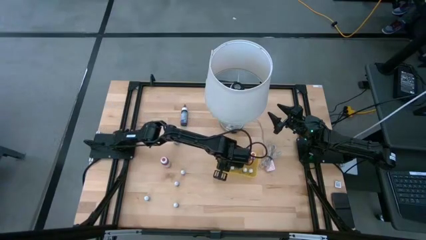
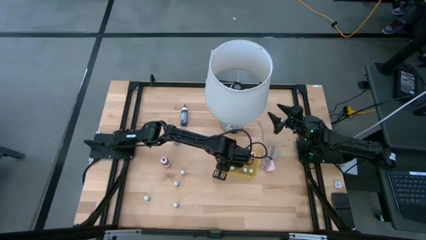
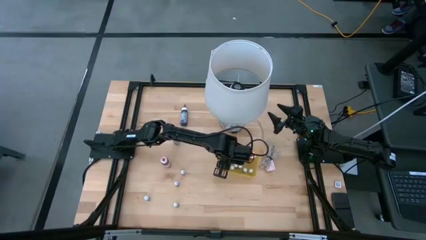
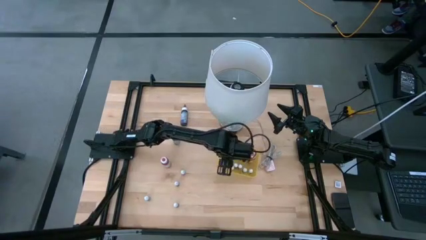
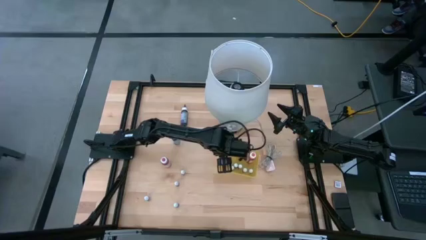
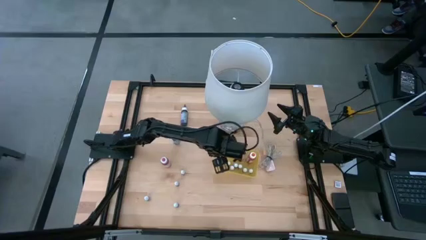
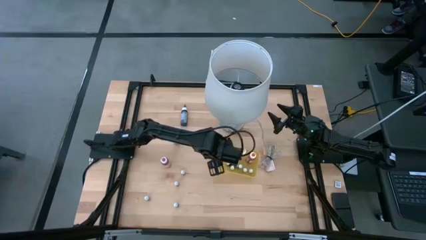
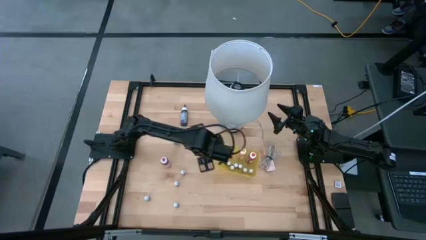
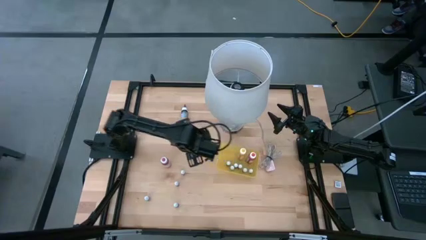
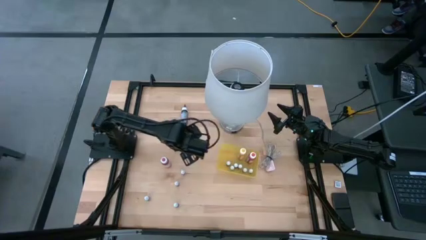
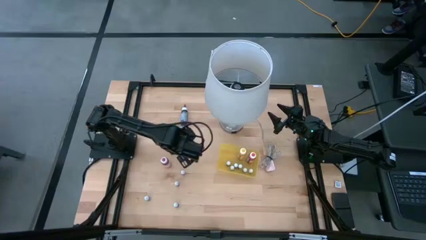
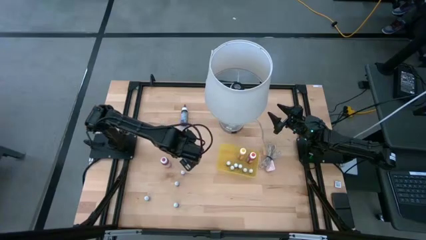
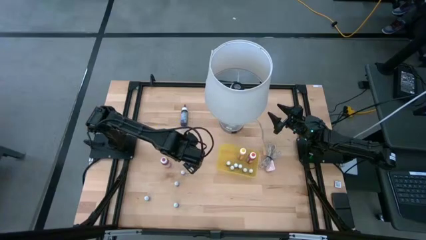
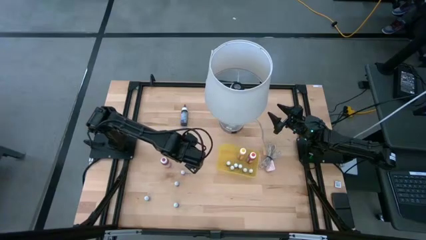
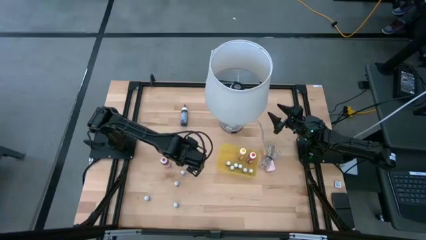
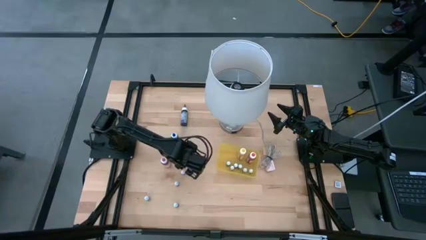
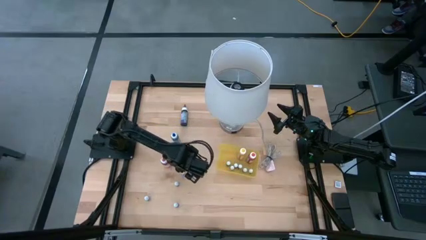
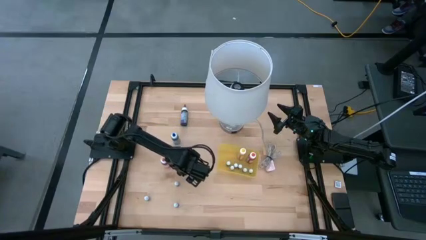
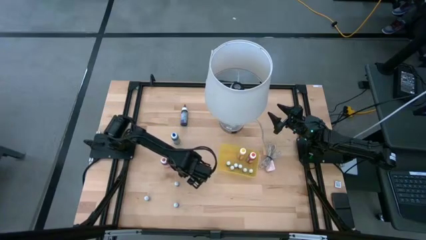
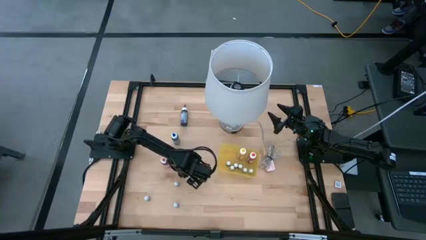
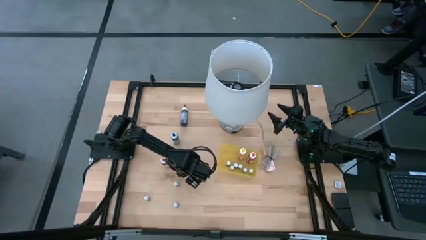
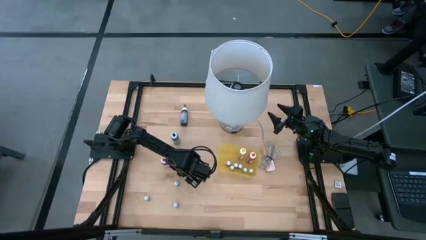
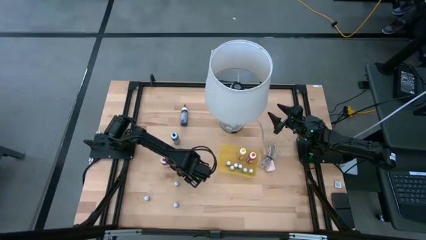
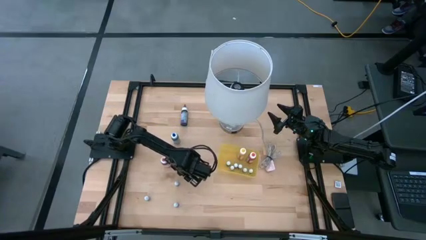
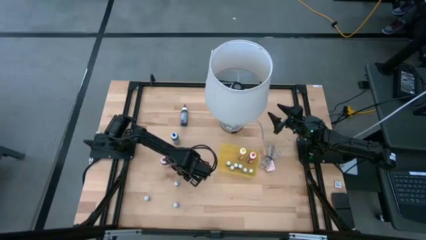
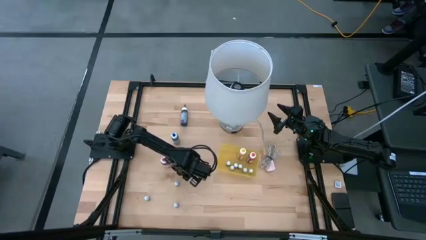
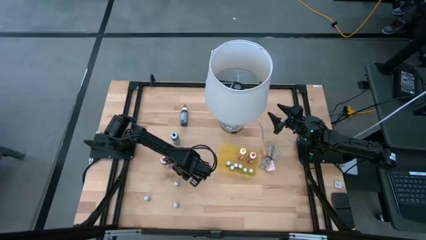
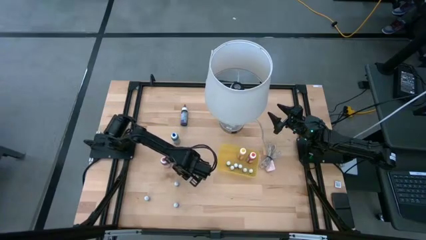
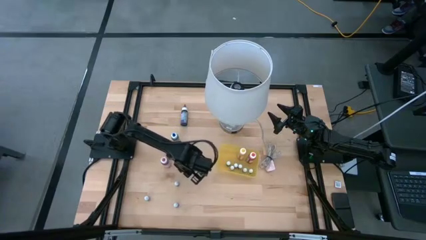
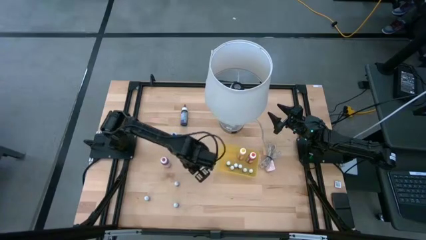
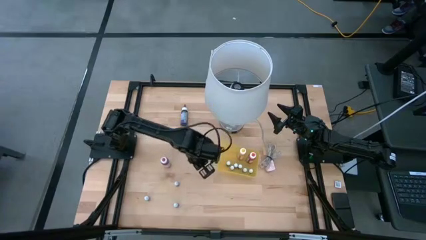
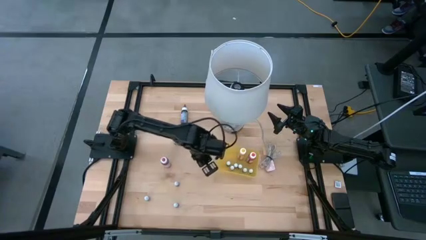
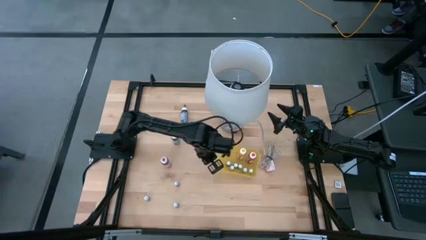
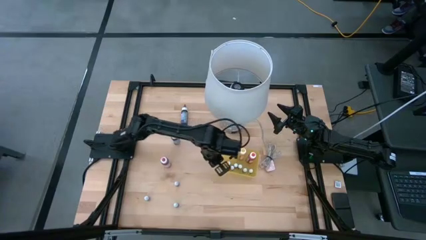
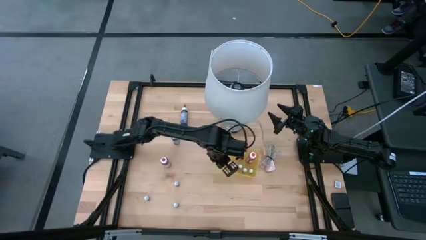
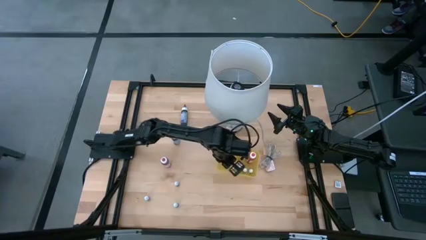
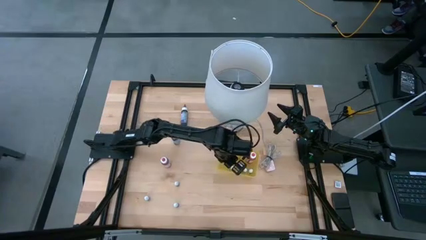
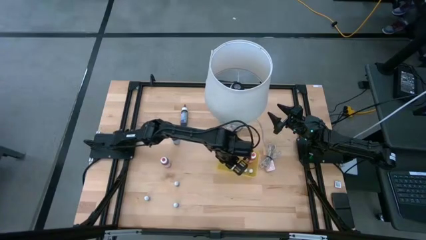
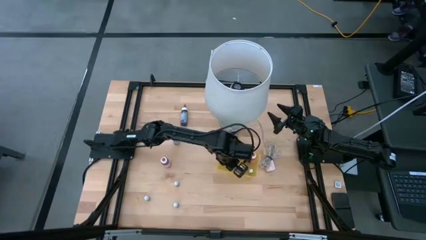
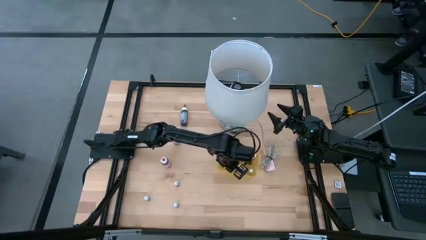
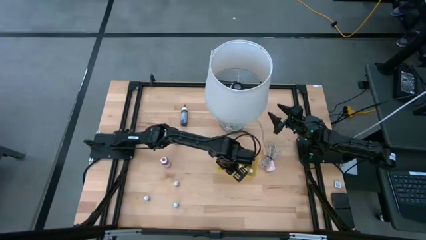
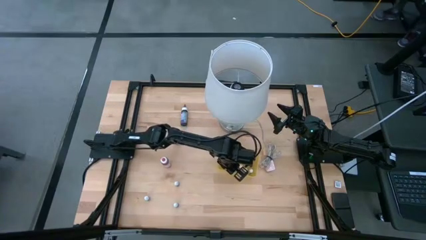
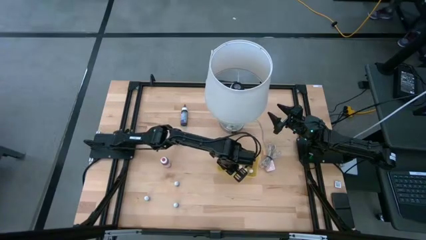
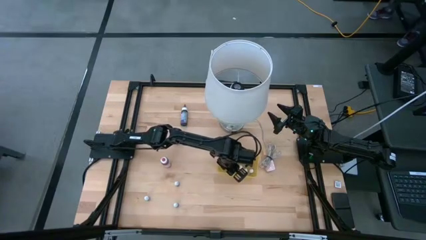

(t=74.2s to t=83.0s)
Task: Pick & Place food coloring
Put the pink food coloring bottle into the yellow bin

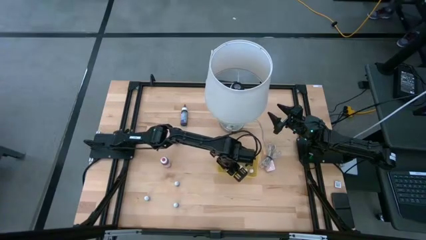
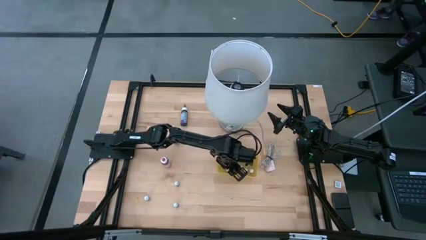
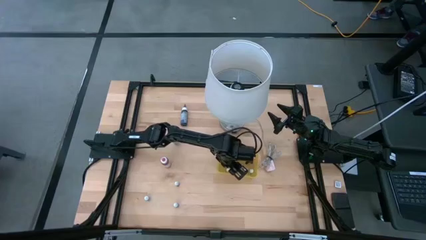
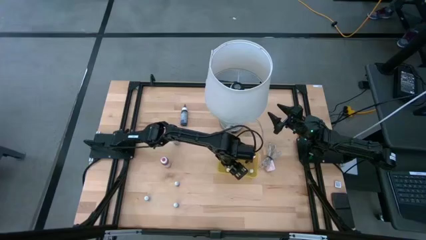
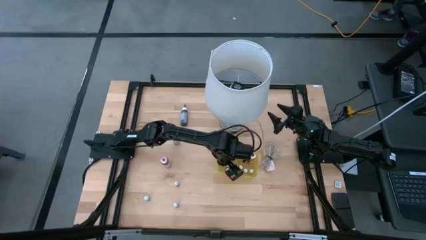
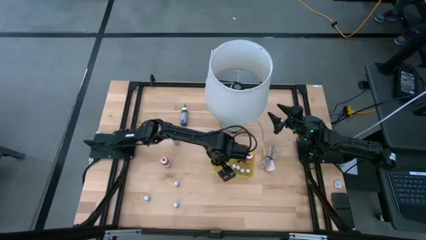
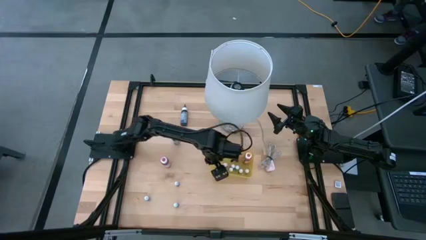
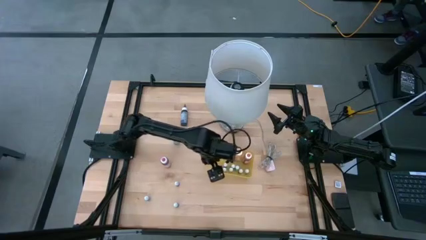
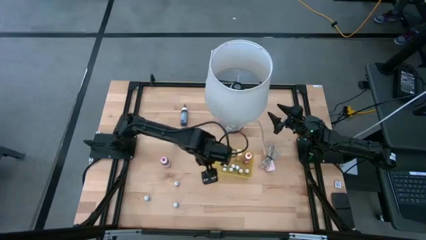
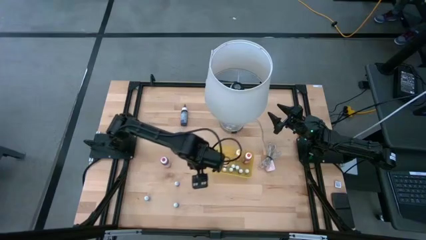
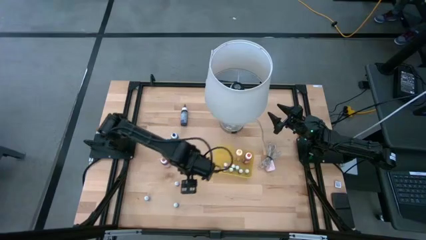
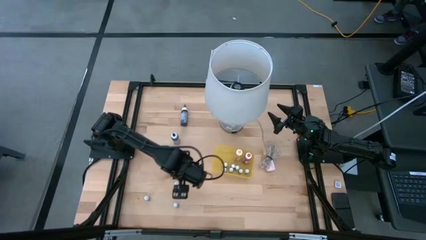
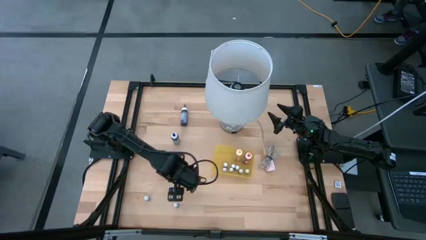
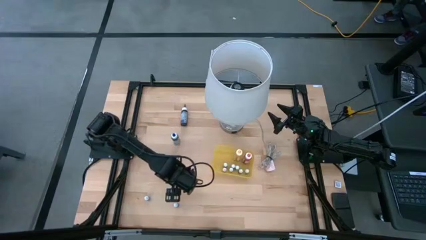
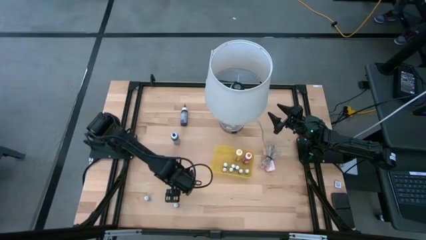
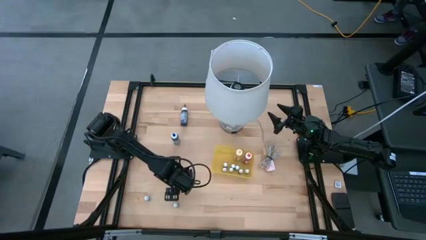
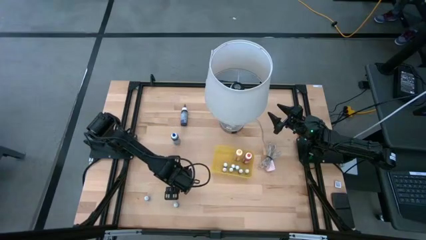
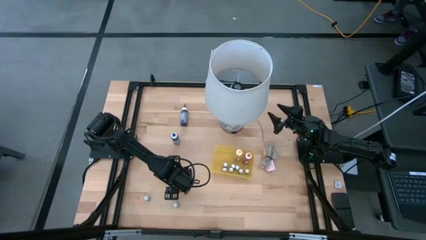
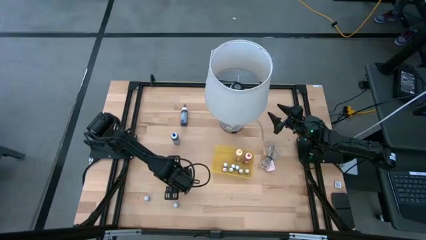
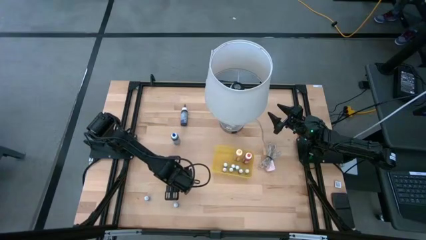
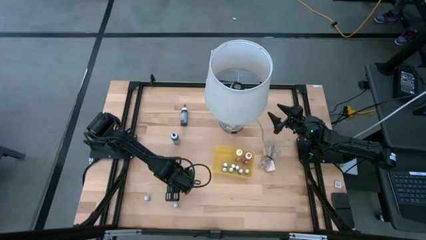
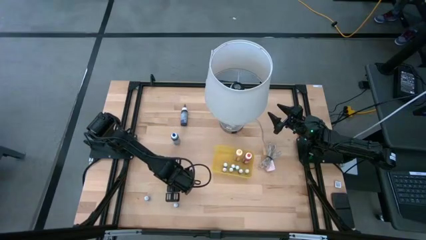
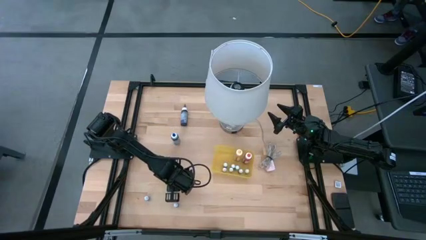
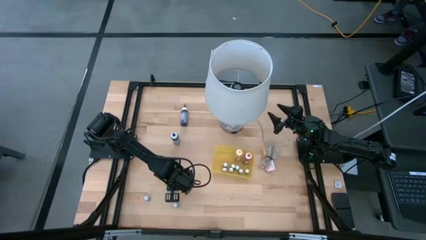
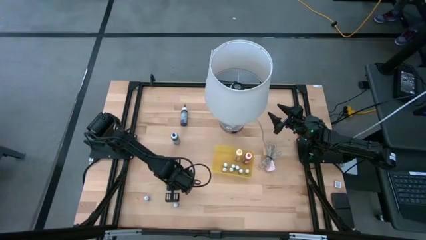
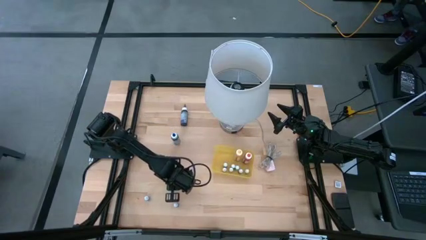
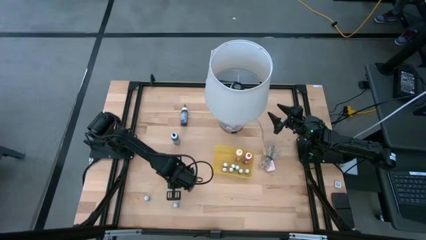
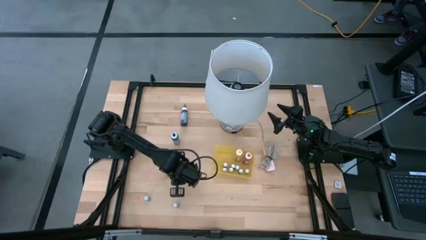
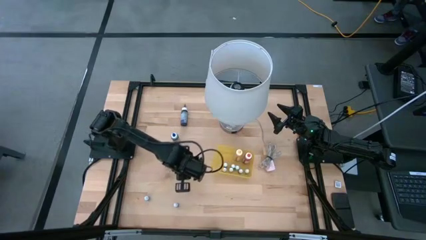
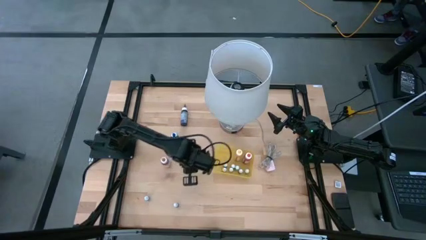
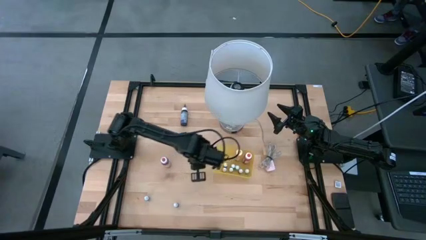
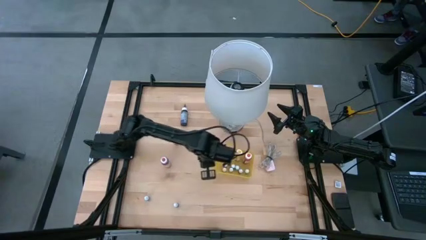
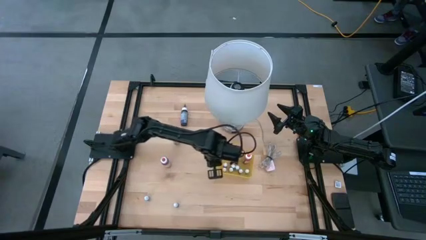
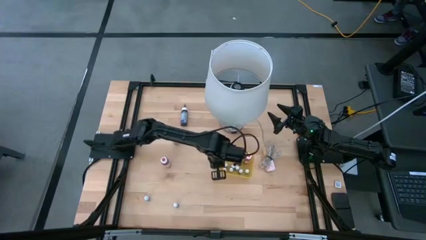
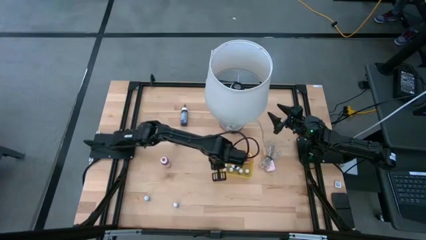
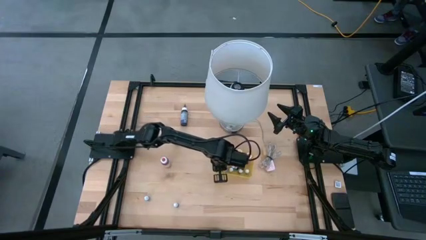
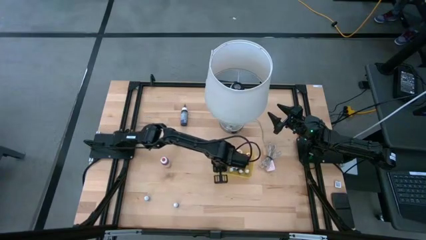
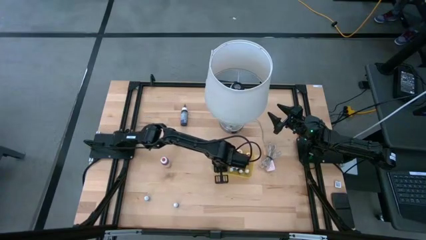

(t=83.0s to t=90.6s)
Put the red food coloring bottle into the yellow bin

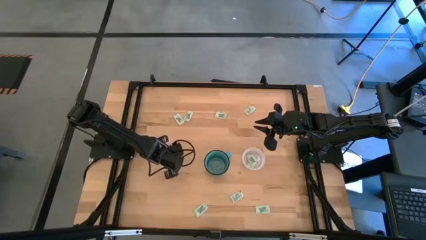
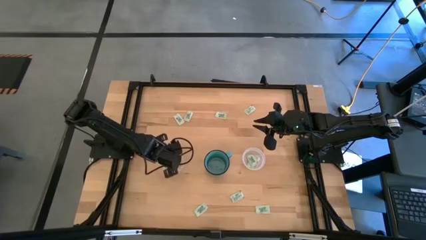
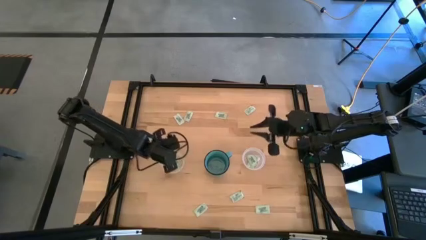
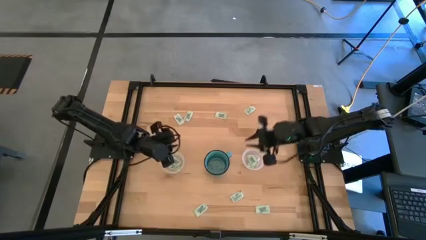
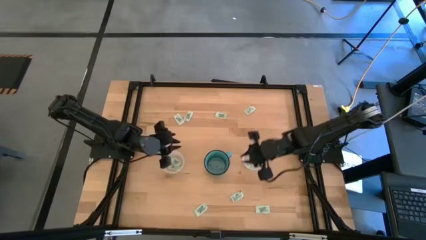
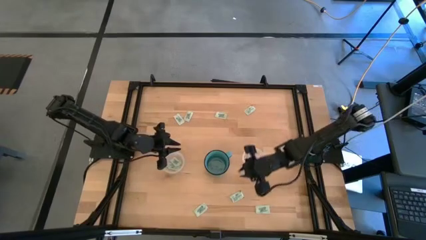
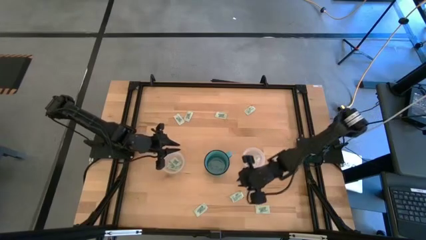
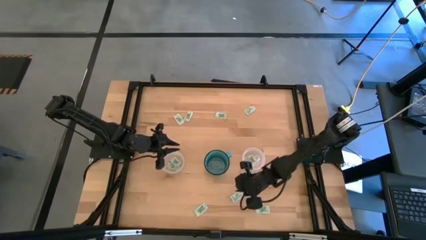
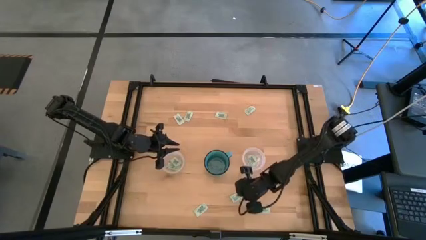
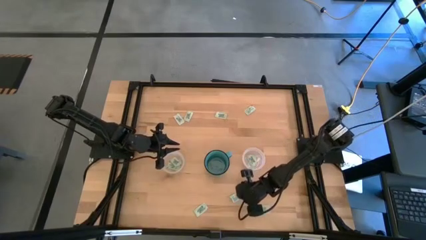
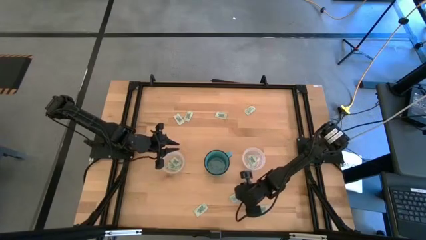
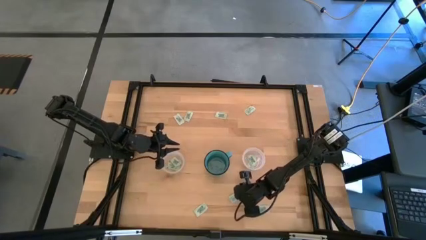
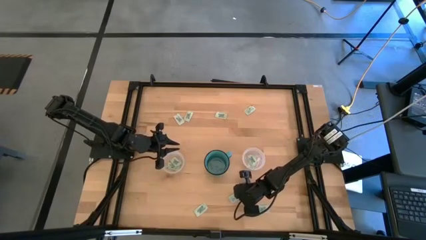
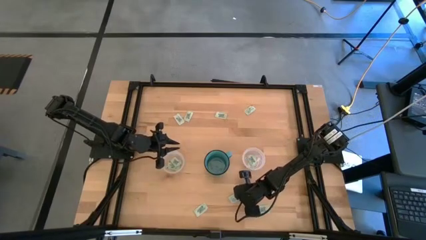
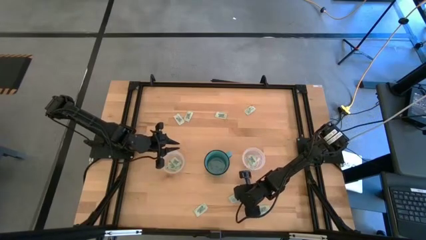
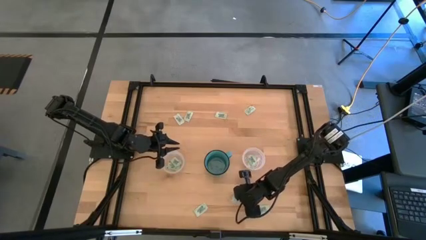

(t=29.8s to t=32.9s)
Task: Pick and place Stevia / Truvia into bins
Put the green stevia packet into the right transparent container
